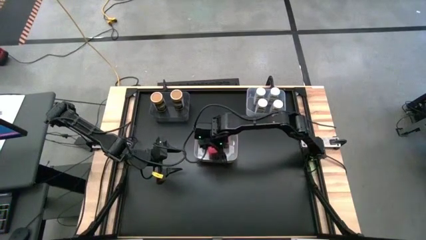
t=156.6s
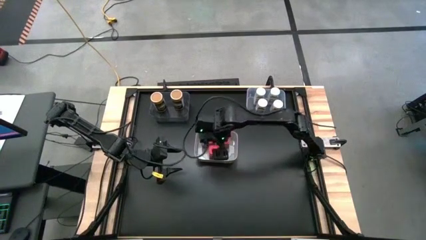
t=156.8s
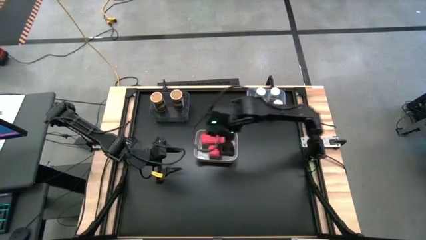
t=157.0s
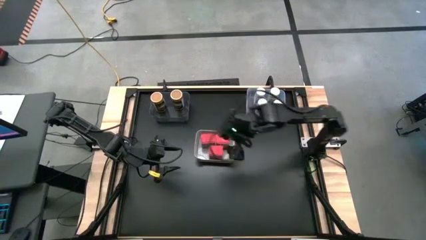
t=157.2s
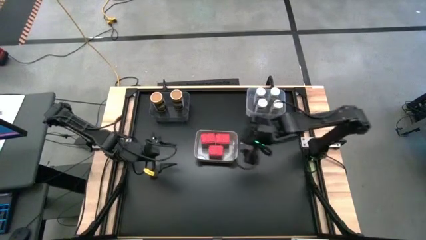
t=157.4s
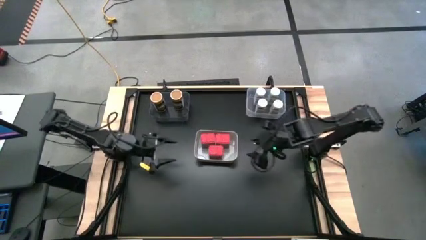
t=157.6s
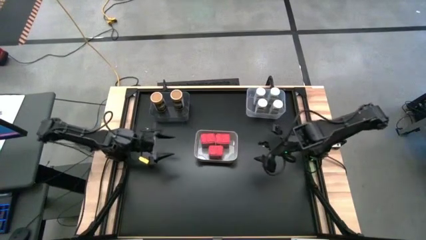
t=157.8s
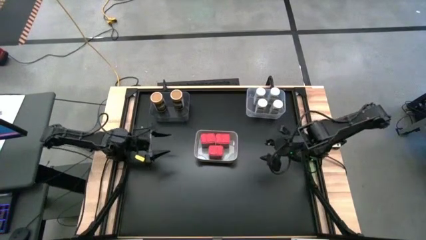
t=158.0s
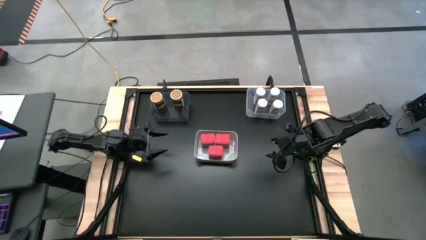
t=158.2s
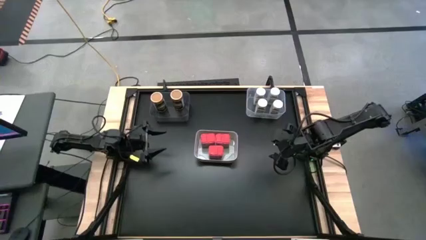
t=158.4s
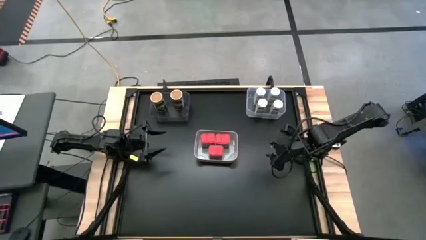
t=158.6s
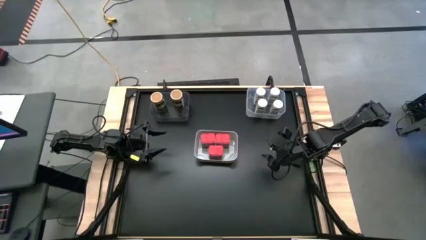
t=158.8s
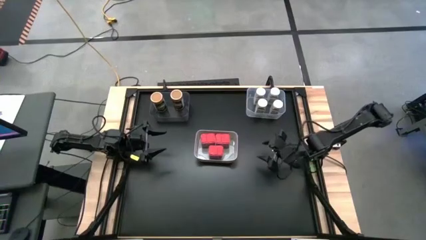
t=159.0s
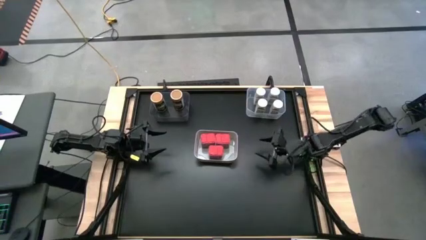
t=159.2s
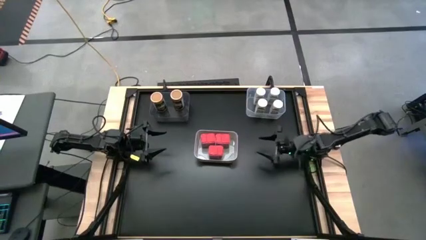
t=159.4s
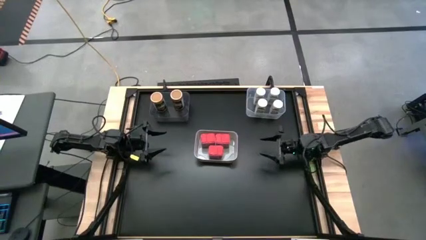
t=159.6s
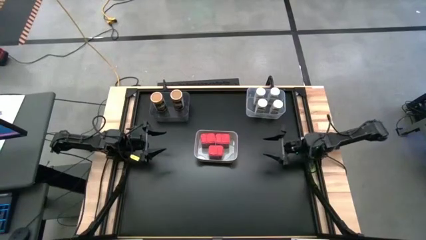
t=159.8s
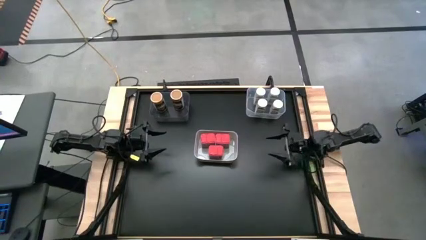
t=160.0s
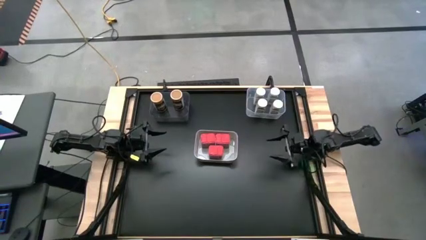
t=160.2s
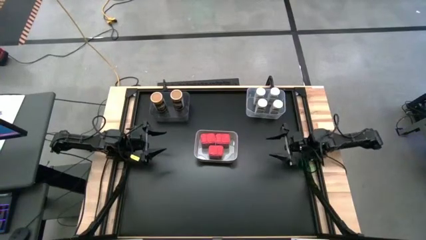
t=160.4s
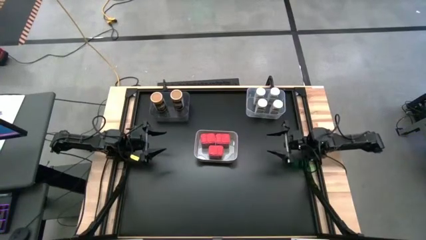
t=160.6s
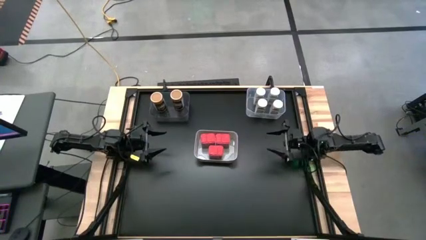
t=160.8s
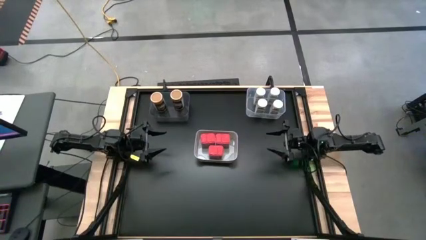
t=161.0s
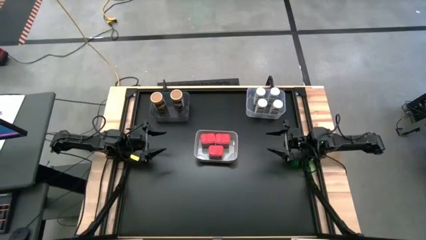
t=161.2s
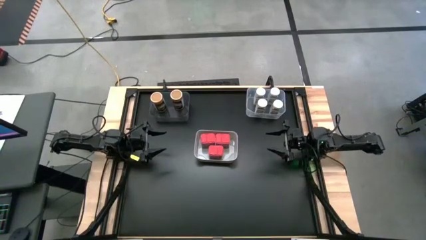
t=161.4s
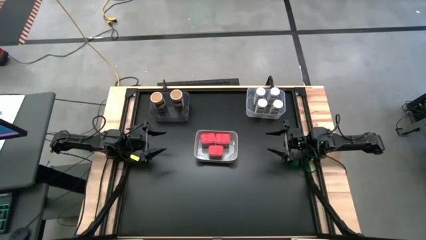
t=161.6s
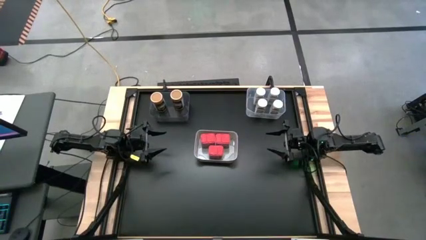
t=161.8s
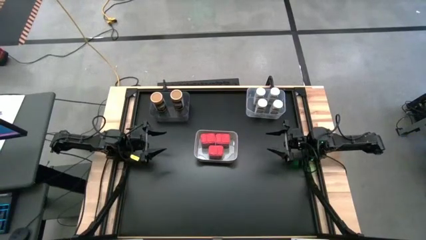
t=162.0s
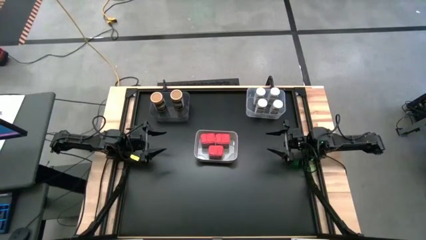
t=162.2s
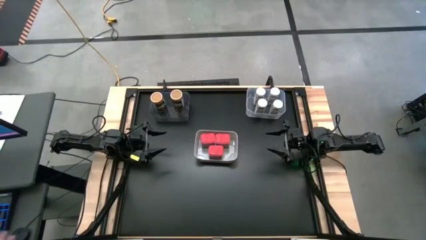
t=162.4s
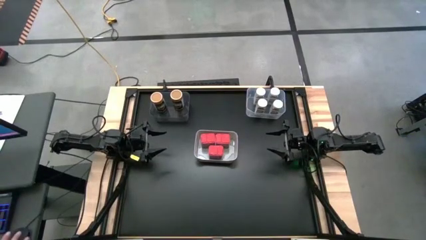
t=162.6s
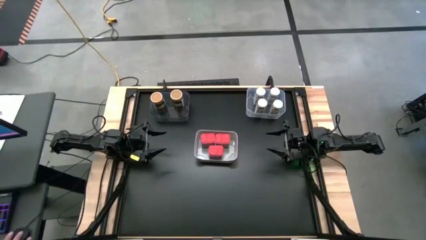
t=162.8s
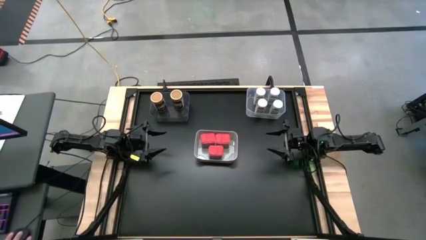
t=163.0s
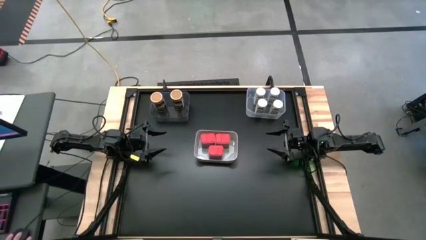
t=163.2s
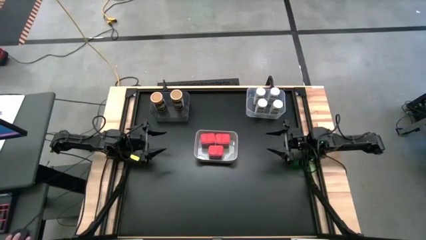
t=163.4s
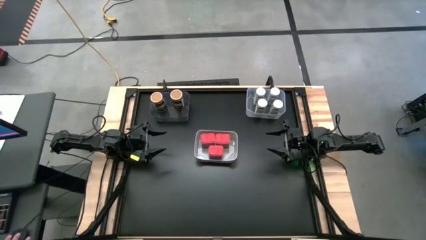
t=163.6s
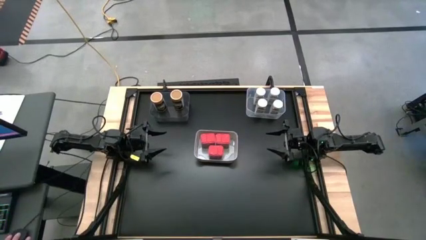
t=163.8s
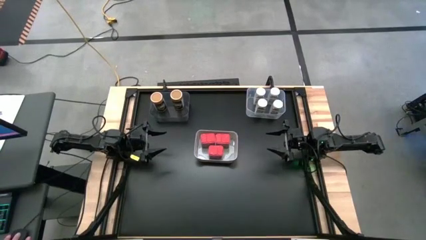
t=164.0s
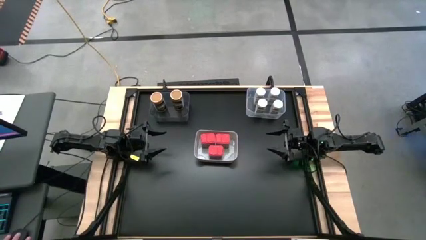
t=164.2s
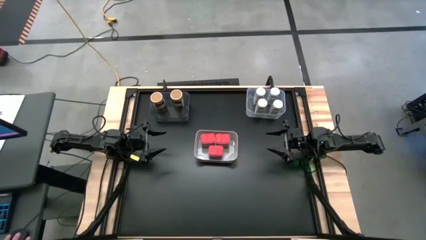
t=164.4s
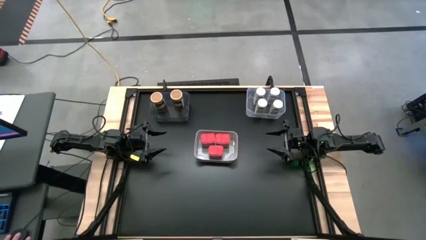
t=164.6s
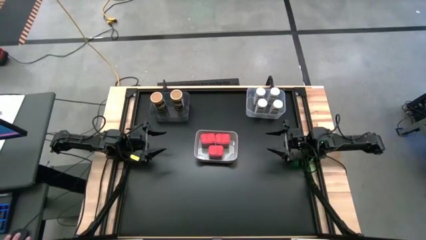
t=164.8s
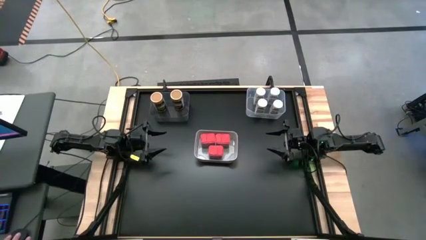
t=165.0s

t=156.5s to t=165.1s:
Task: Sort spices by type
Return to Home Position

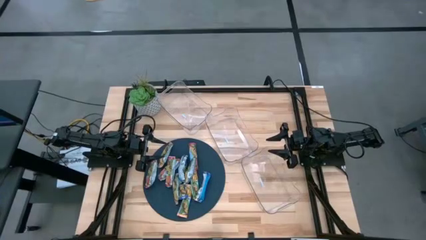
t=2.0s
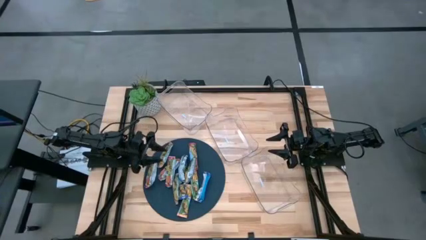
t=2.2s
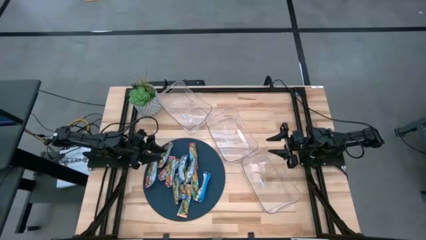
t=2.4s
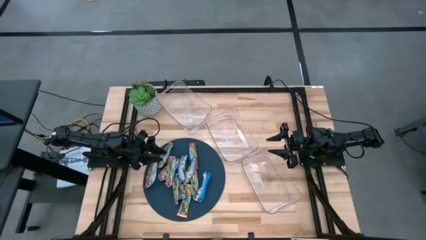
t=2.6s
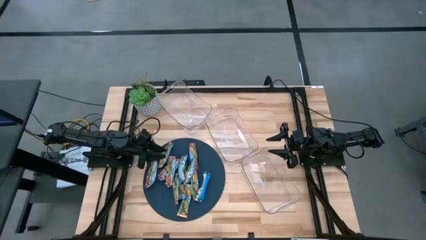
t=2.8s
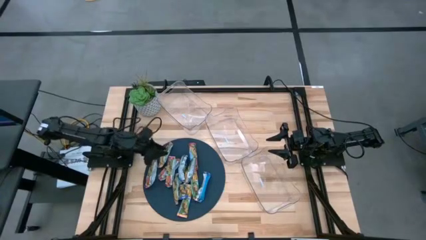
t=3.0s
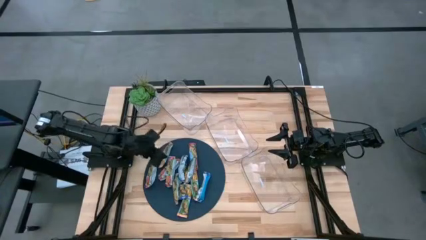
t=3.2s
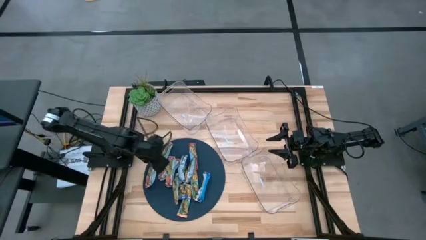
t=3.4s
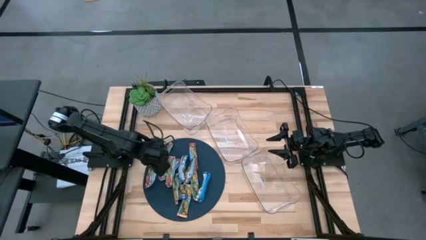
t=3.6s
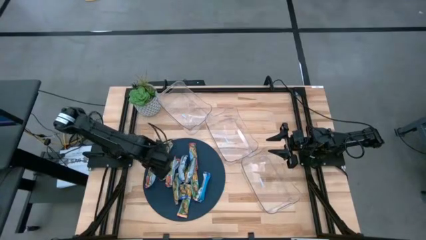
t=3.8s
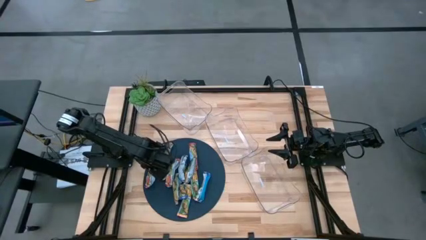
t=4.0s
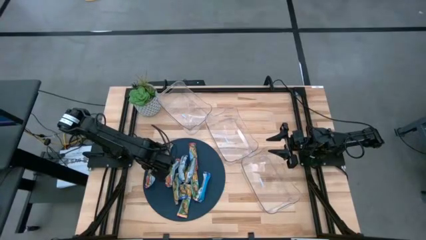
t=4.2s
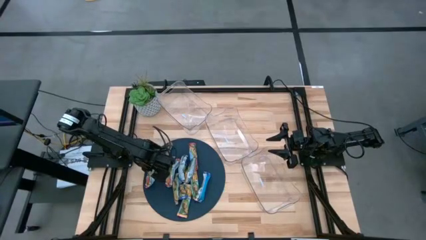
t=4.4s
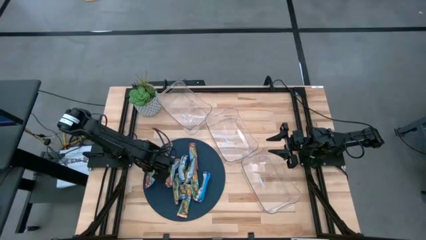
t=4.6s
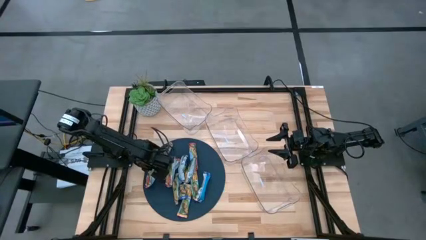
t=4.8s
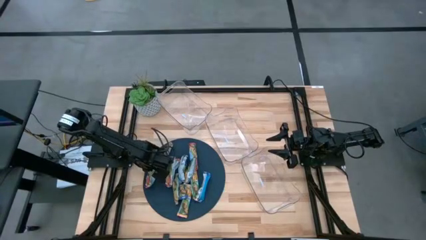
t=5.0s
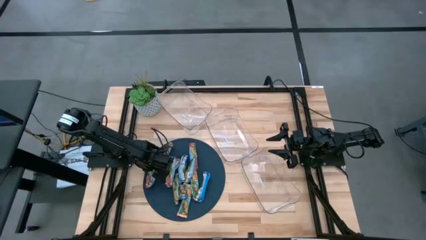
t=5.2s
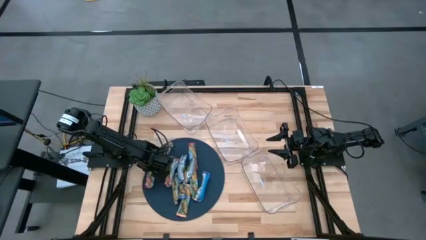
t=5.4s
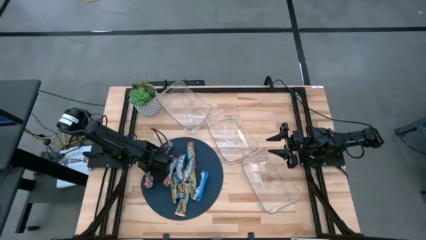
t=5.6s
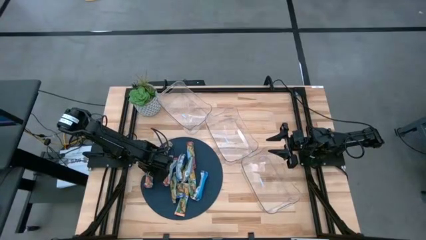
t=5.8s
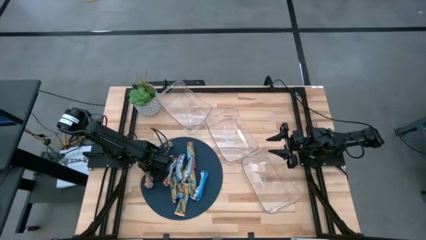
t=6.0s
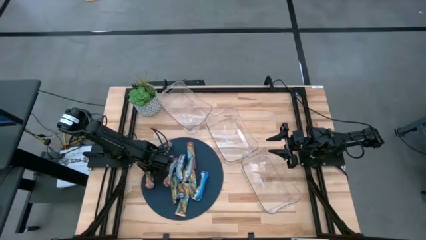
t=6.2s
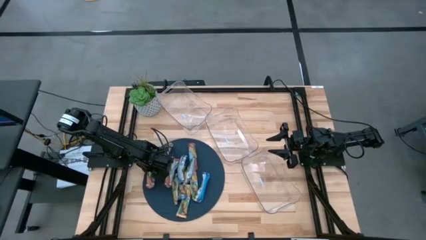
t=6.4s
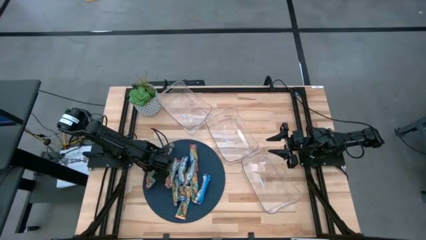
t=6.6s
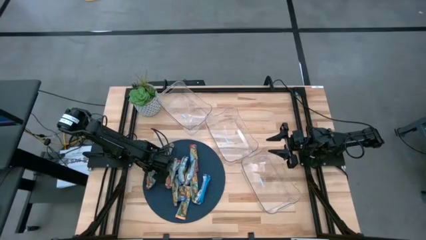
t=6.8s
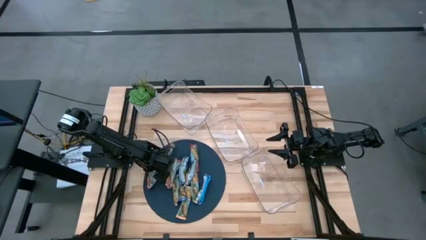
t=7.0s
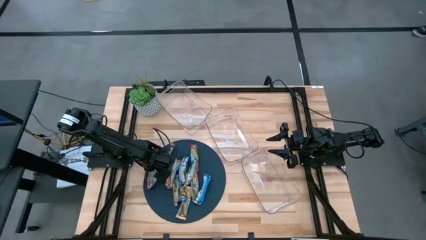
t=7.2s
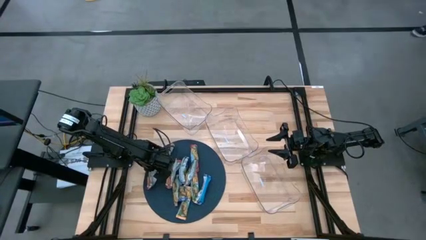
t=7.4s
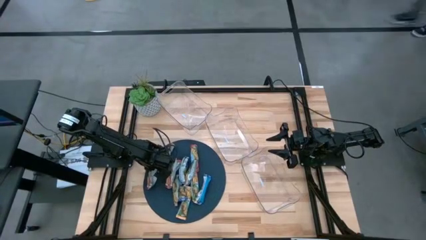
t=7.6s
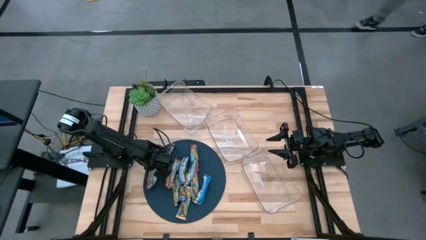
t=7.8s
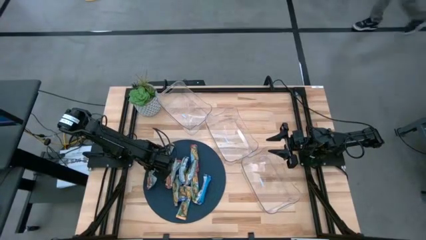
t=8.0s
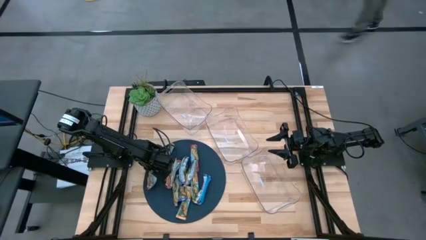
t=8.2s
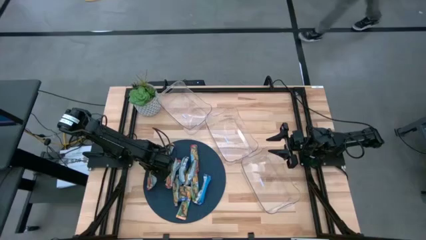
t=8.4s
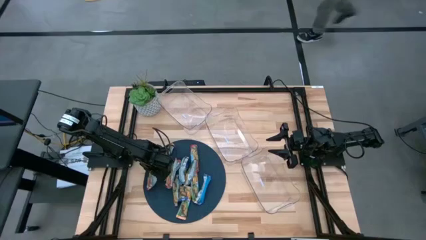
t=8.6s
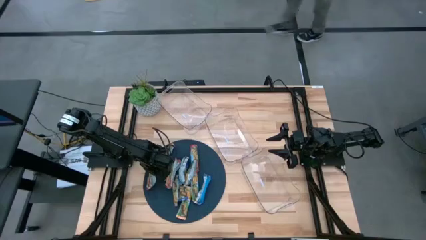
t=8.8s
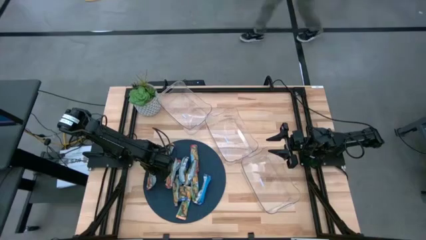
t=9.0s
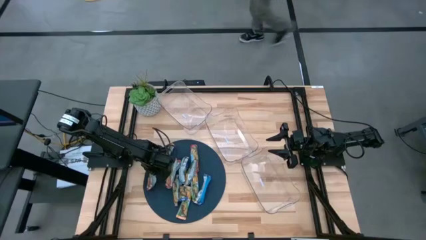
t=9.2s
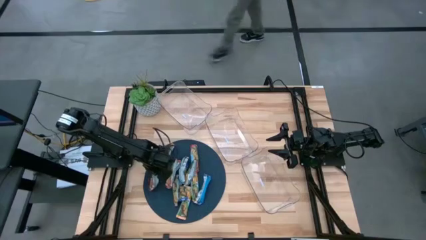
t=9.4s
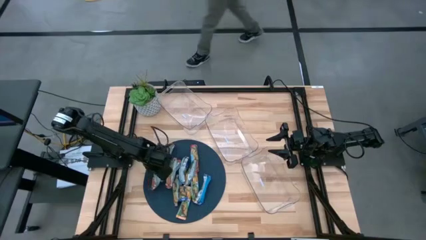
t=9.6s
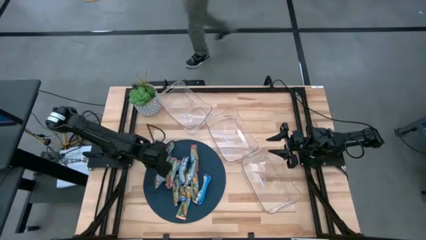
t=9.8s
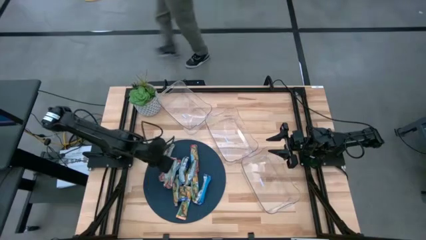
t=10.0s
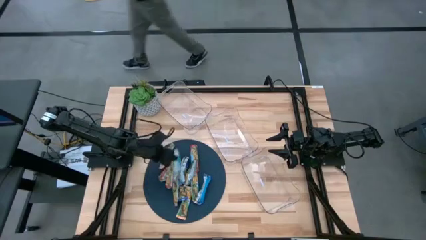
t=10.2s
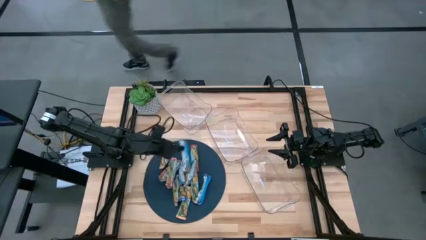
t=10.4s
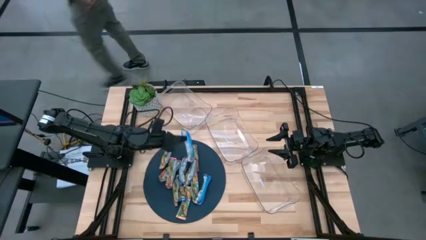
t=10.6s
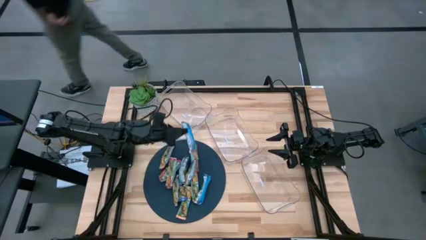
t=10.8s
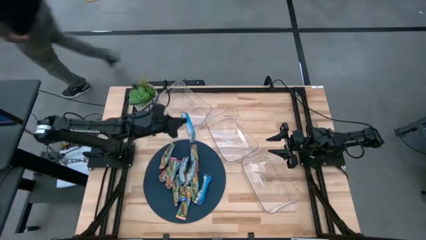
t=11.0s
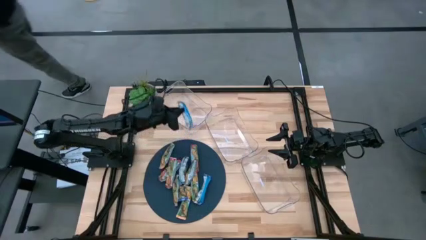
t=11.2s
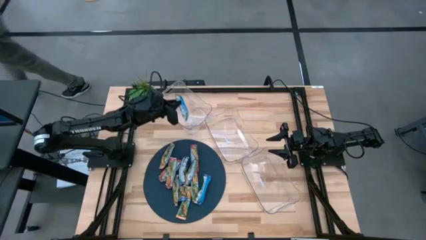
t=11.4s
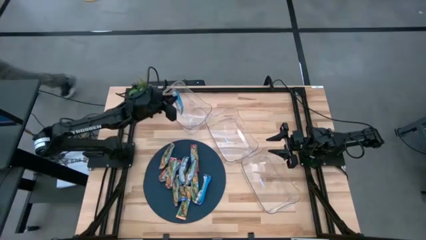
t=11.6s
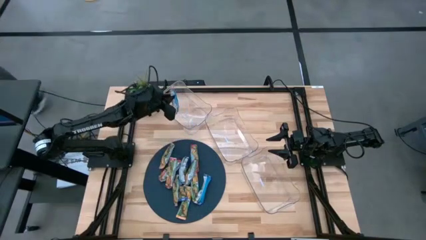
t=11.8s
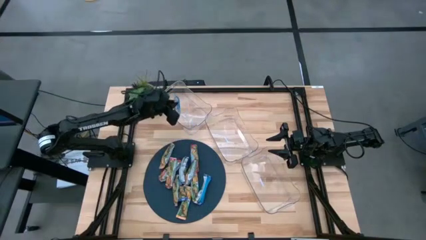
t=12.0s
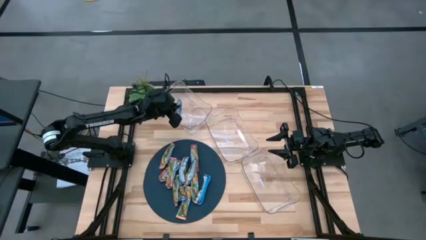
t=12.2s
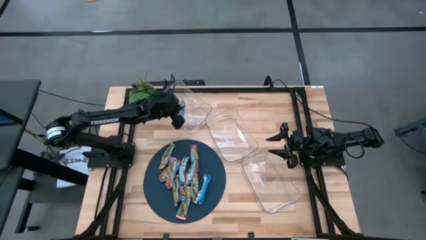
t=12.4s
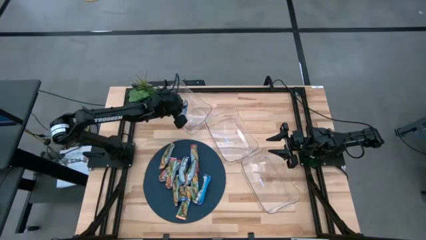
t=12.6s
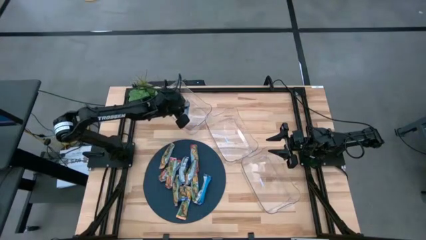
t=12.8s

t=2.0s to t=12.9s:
Task: Pick and place Granola Bars by type
Put the red granola bar into the top transparent bin
